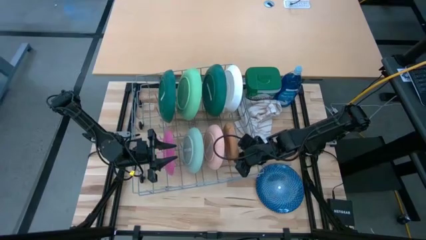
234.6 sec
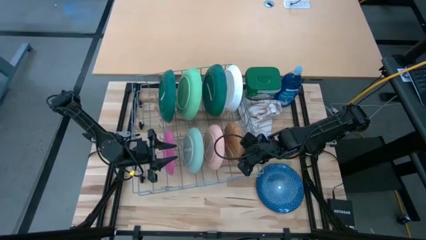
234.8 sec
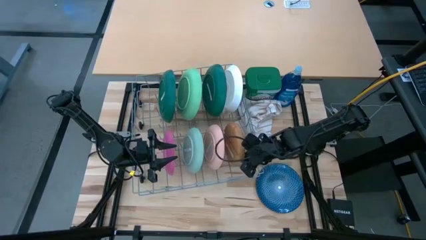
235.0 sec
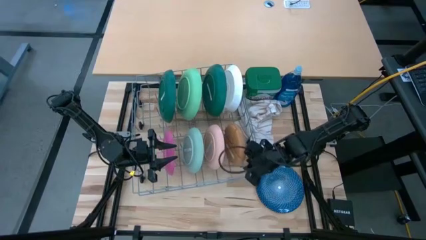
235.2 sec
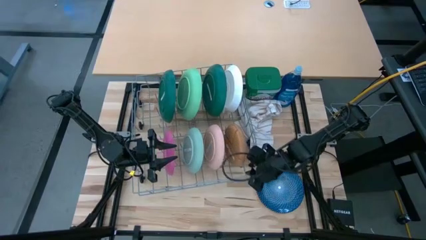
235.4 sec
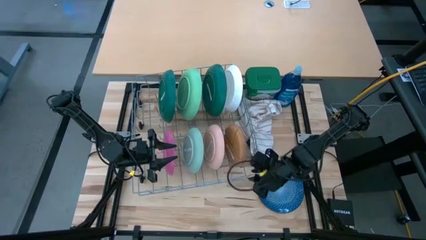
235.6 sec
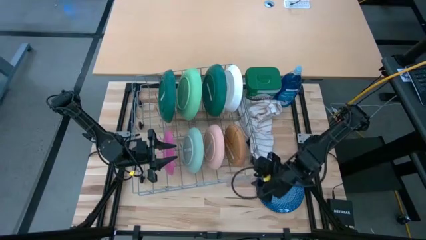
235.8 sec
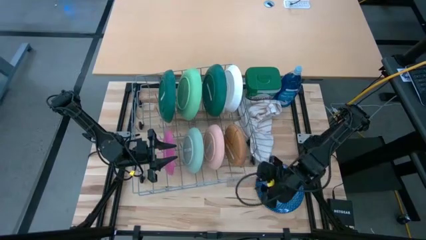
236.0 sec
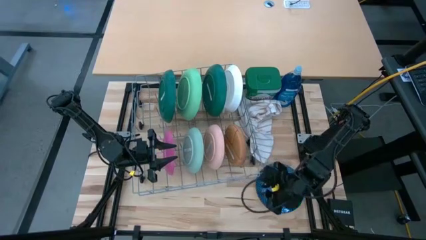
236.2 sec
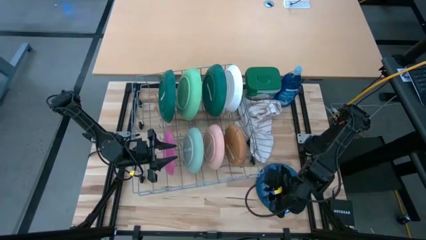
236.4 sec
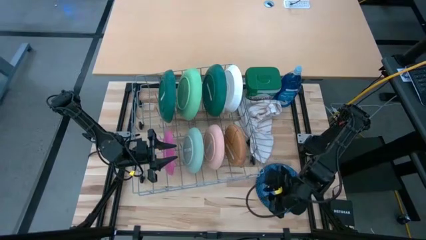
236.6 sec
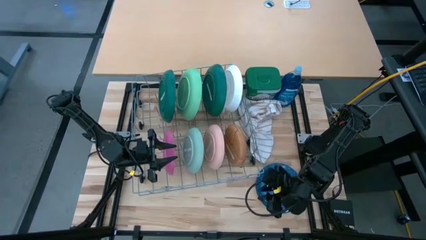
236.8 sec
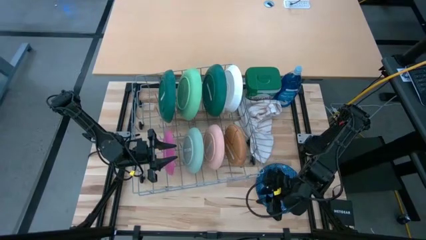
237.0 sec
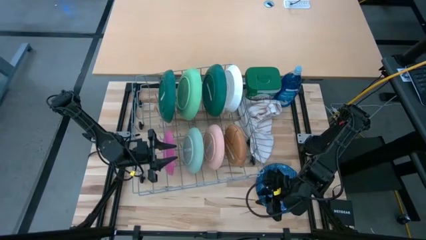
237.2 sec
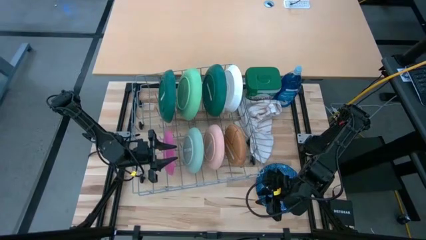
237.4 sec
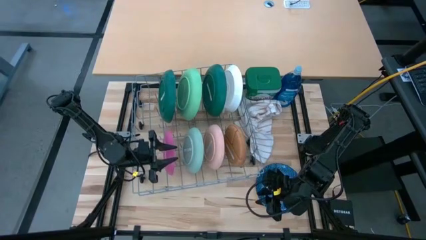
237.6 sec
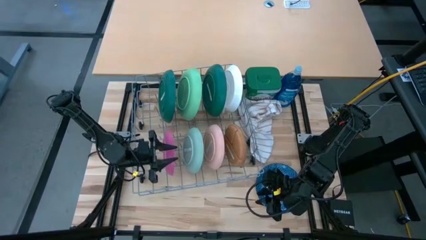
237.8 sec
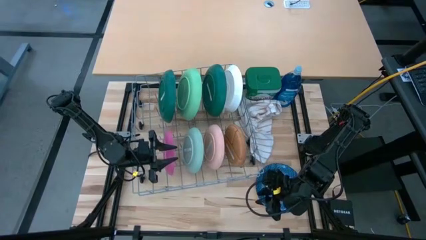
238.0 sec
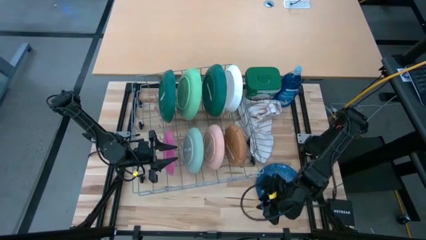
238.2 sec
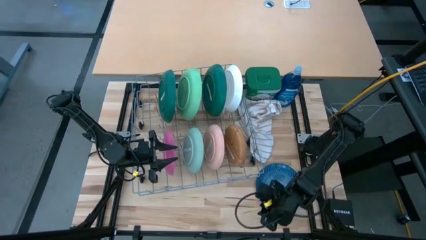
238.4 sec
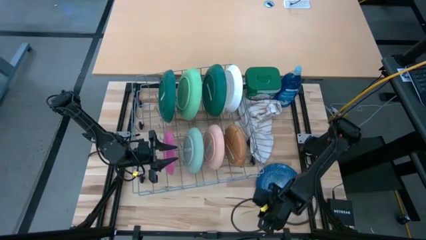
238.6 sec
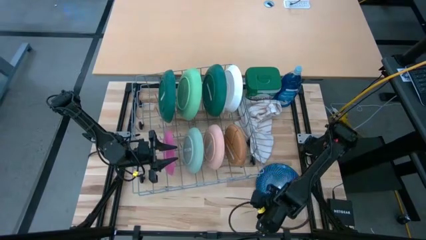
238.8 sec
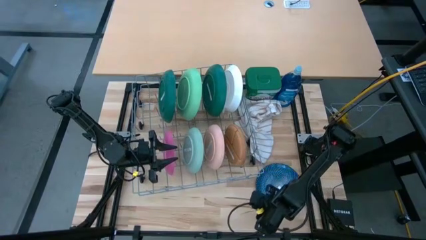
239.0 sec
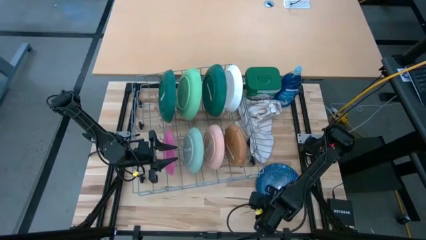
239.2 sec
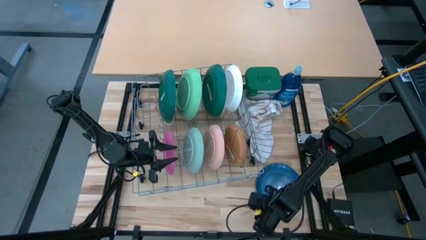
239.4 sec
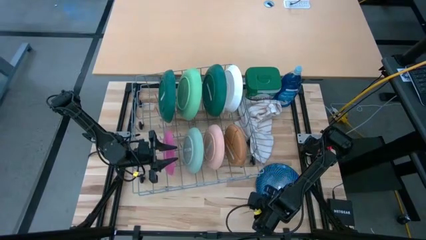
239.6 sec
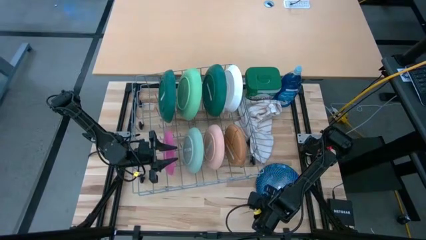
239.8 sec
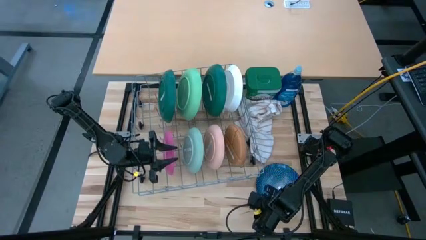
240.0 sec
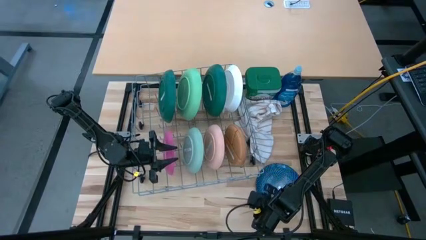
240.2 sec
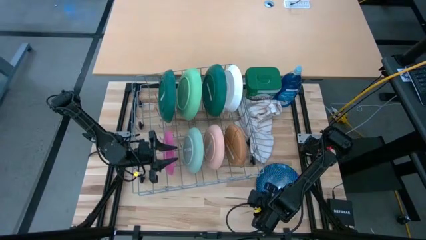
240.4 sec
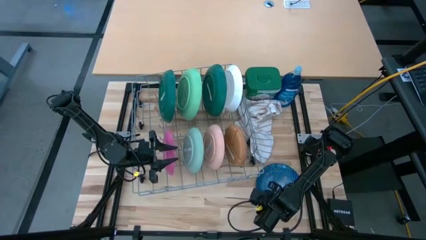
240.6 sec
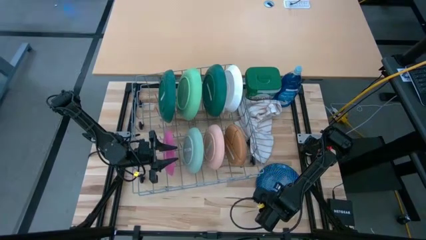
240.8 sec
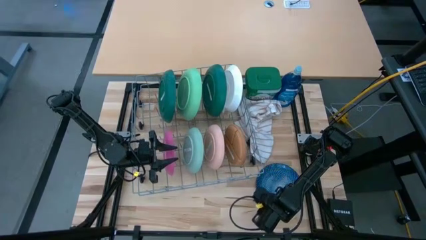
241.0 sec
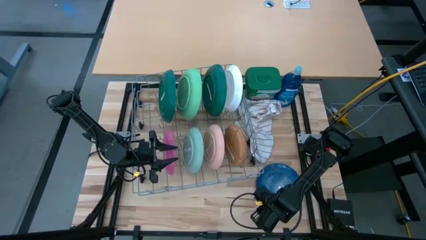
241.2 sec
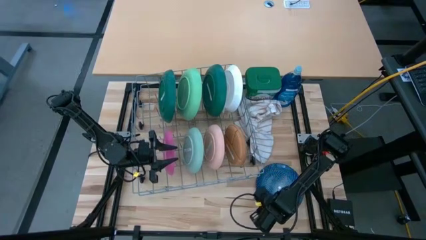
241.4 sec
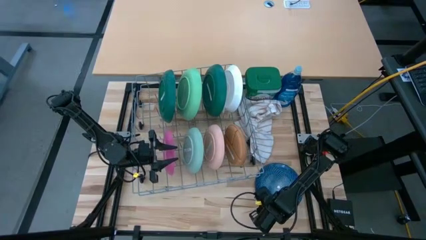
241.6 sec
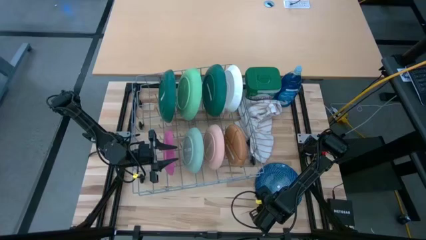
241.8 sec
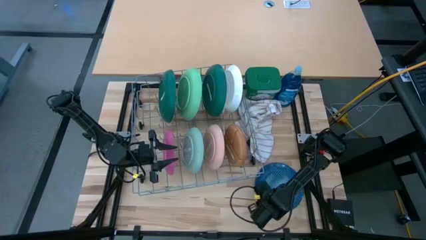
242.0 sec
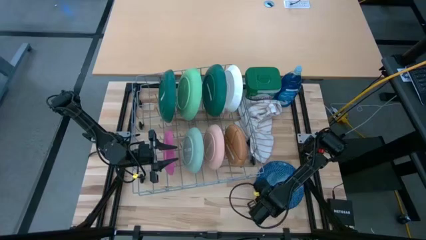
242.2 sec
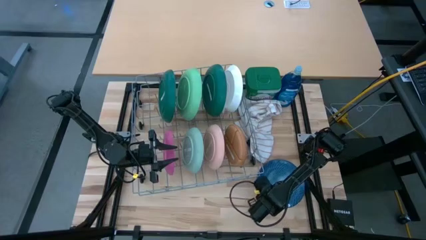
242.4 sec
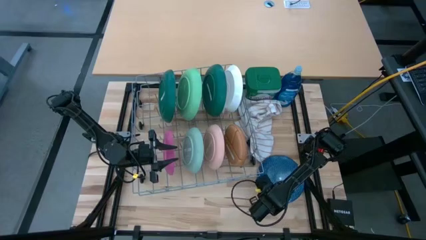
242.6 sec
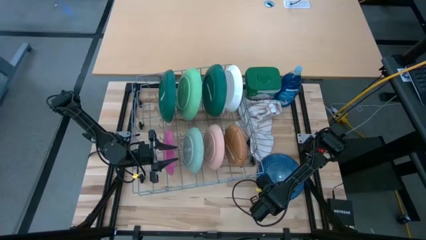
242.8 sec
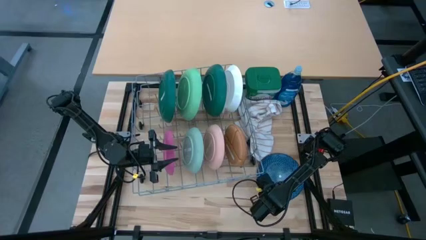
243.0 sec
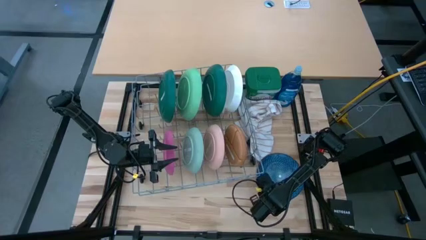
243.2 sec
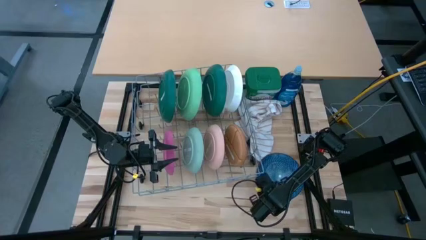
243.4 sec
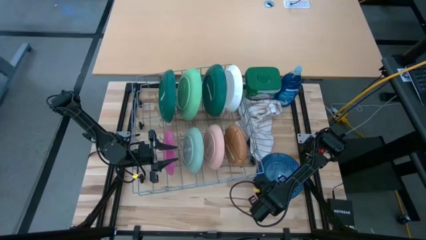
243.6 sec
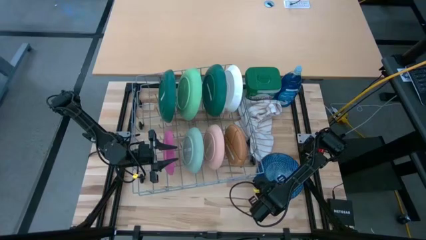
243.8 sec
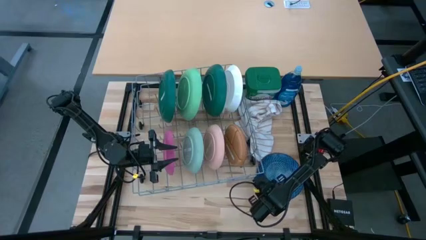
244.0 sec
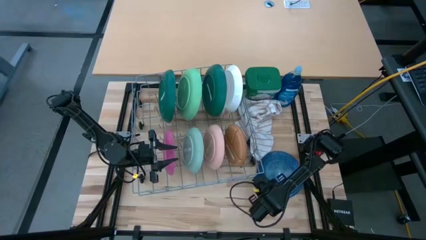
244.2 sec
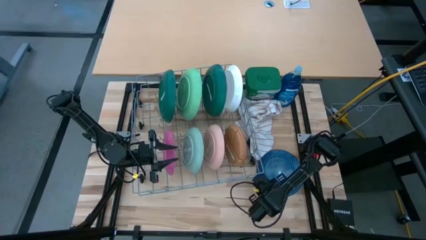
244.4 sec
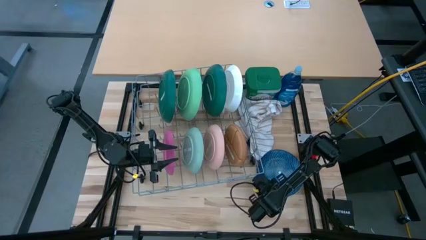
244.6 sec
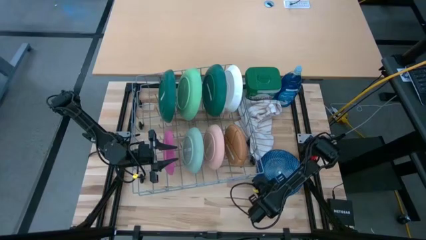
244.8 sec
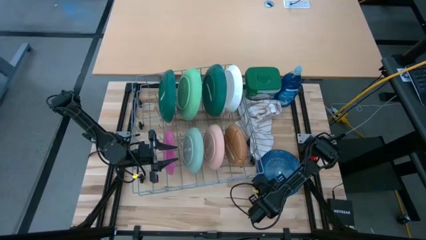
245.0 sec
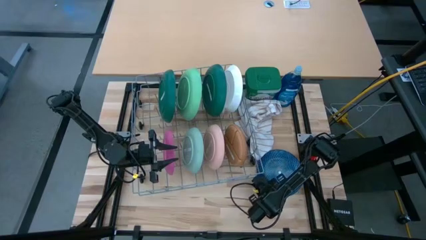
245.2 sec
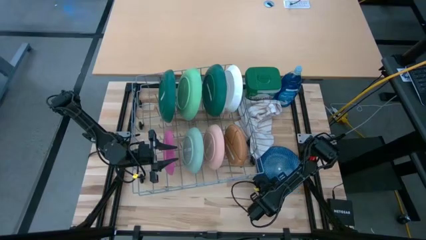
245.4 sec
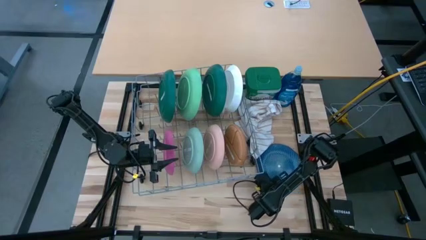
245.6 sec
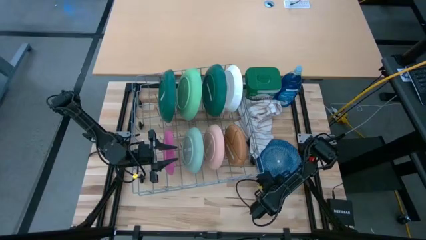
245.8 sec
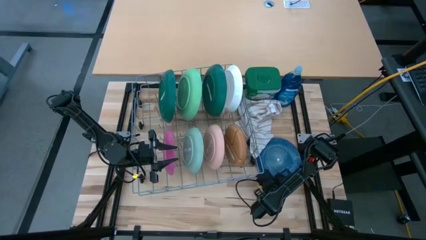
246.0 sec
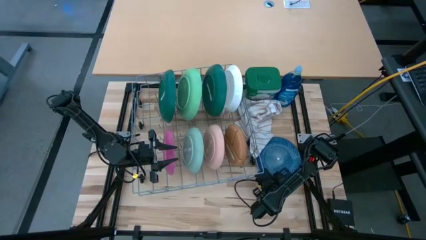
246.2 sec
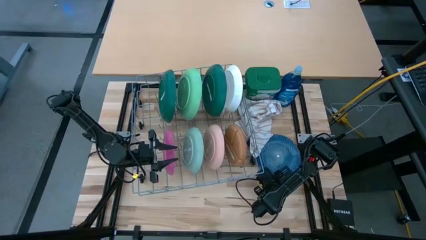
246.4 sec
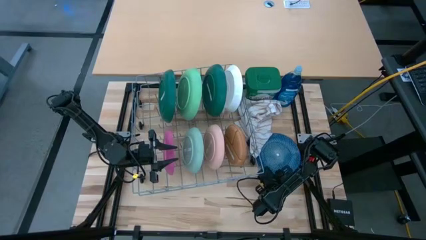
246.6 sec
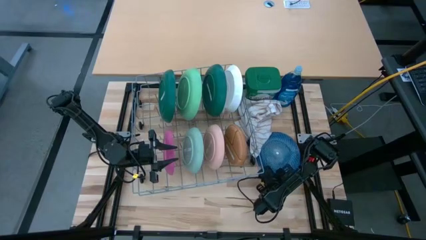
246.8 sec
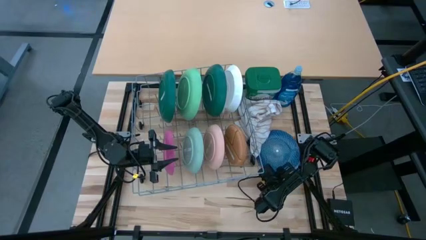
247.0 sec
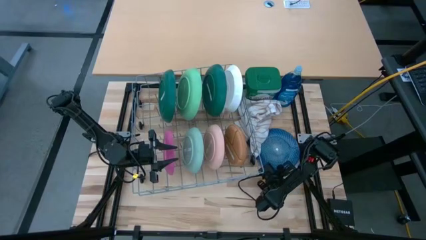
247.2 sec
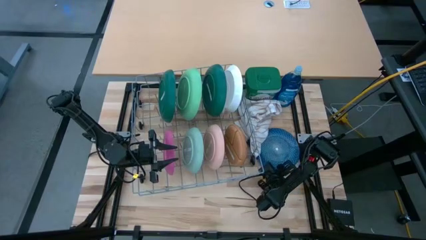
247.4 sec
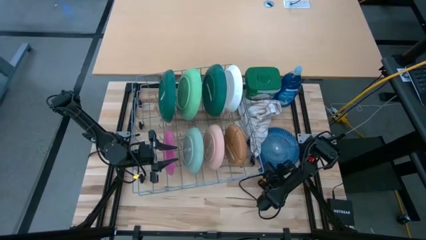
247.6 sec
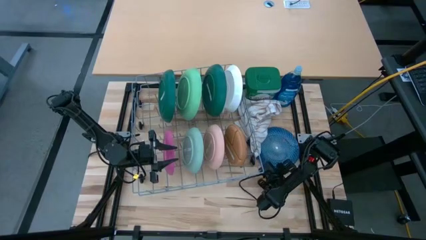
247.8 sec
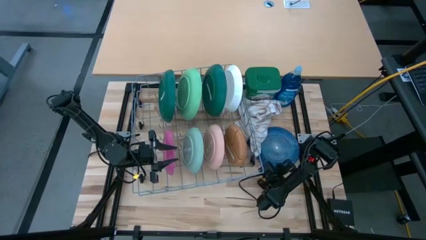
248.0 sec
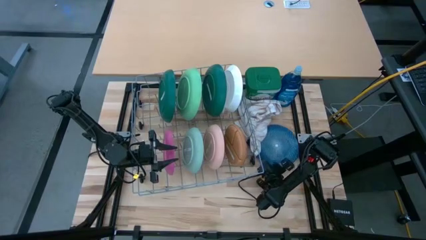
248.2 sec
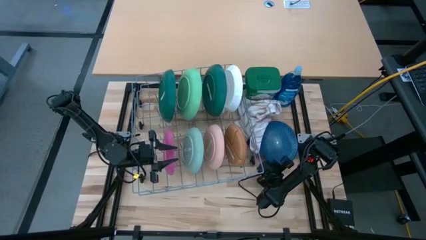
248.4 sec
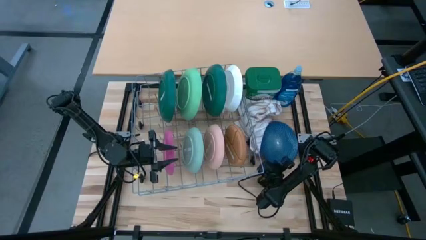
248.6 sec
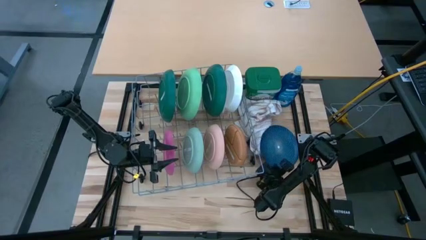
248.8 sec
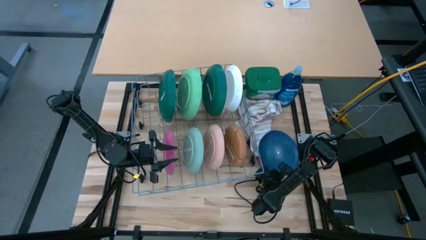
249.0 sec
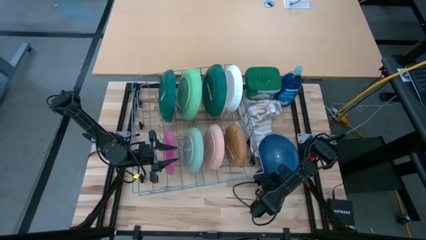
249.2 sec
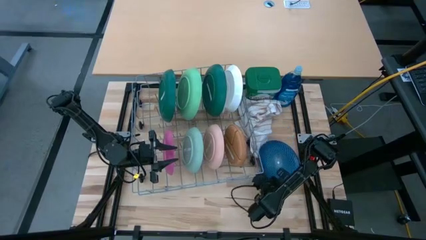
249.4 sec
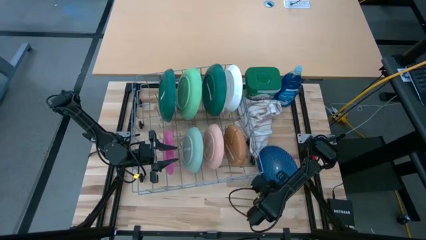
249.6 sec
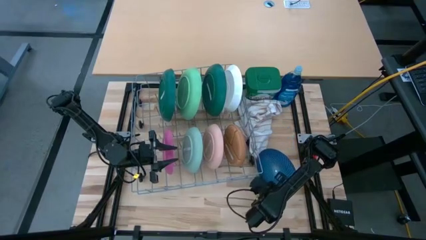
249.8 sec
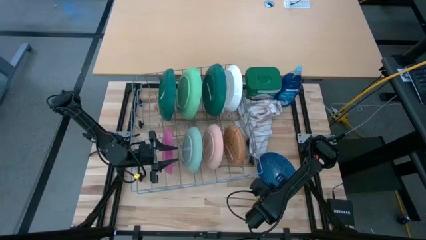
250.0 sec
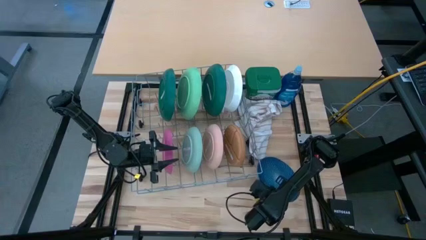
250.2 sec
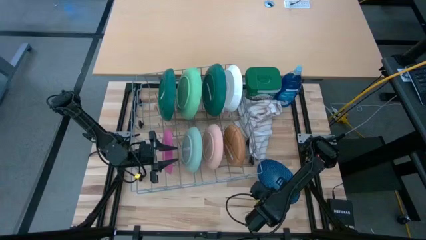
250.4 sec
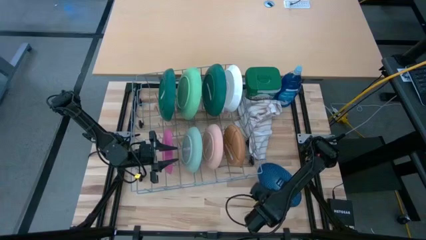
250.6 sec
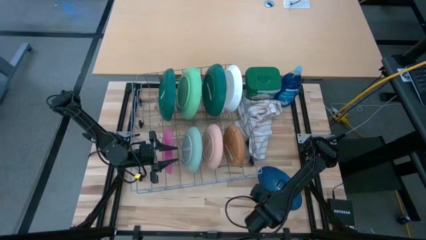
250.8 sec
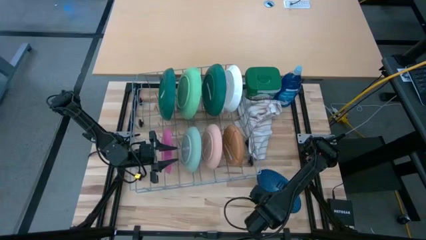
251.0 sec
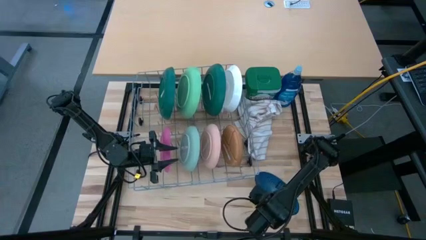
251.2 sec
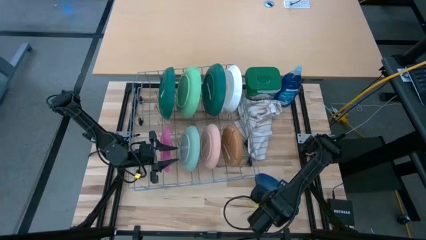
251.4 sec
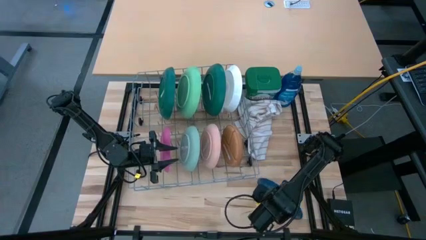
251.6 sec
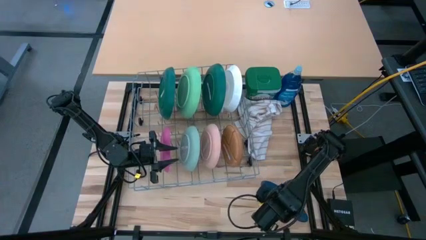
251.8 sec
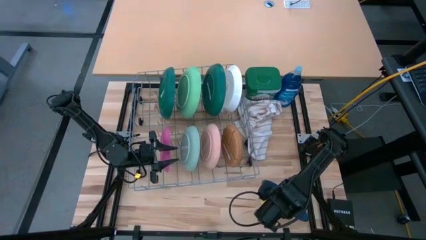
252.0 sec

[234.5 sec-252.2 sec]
Task: Sort dishes
Put the blue plate in the dish rack
